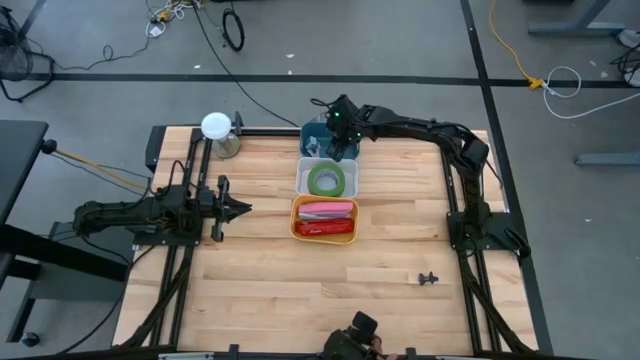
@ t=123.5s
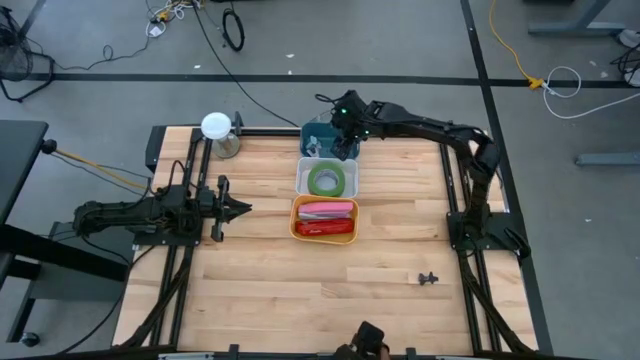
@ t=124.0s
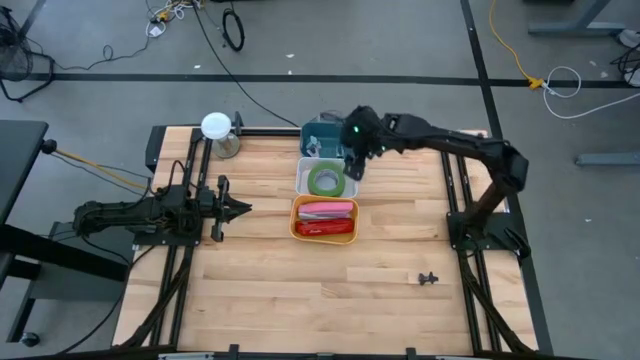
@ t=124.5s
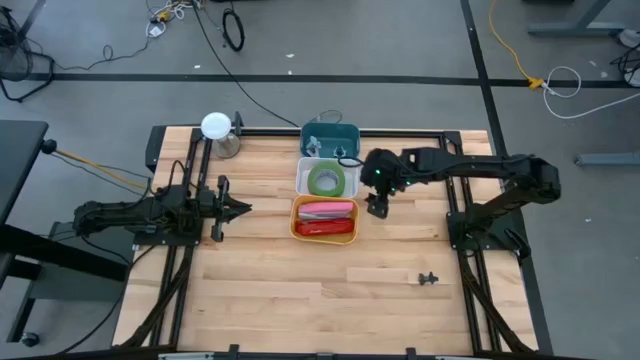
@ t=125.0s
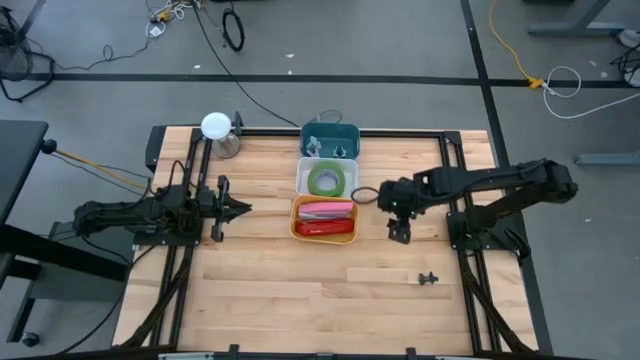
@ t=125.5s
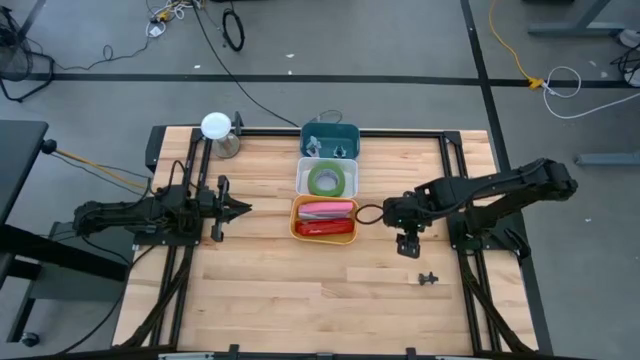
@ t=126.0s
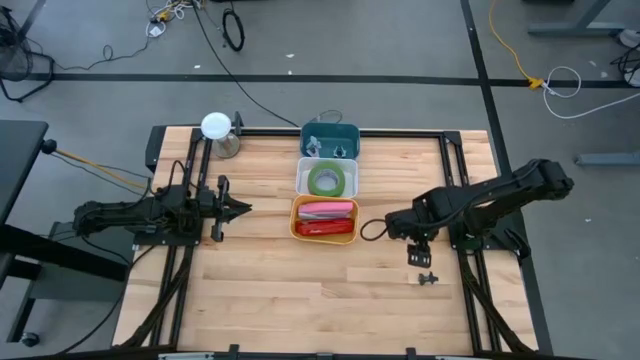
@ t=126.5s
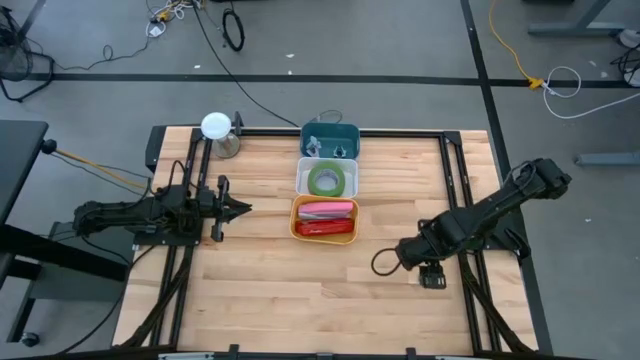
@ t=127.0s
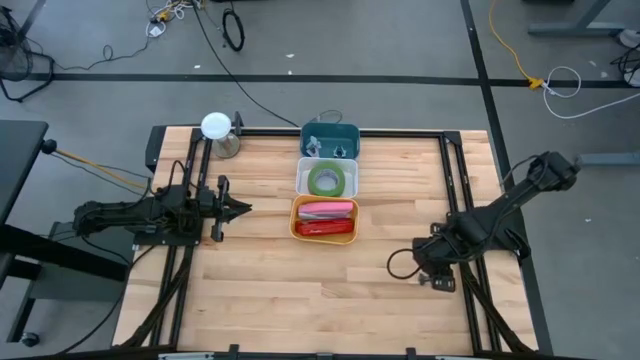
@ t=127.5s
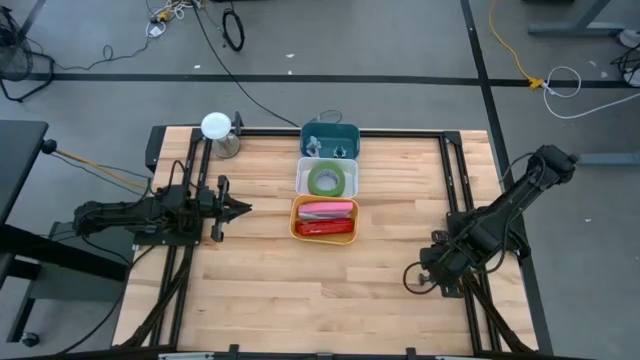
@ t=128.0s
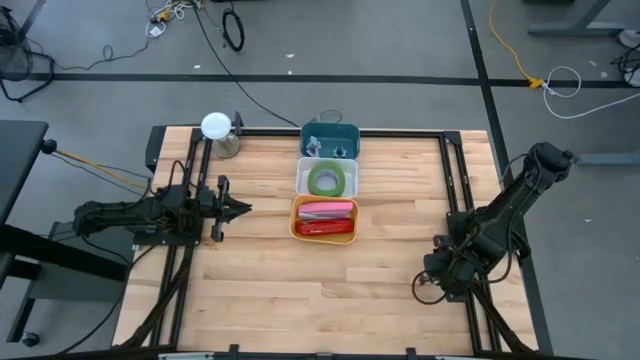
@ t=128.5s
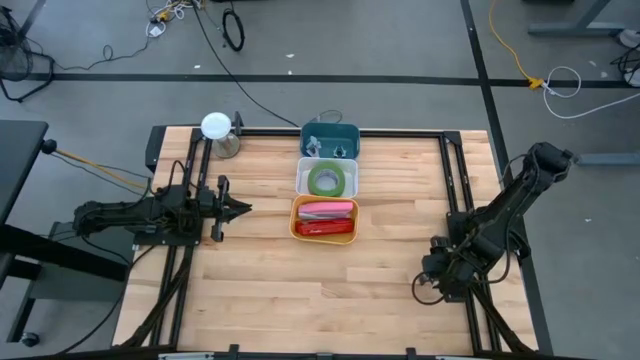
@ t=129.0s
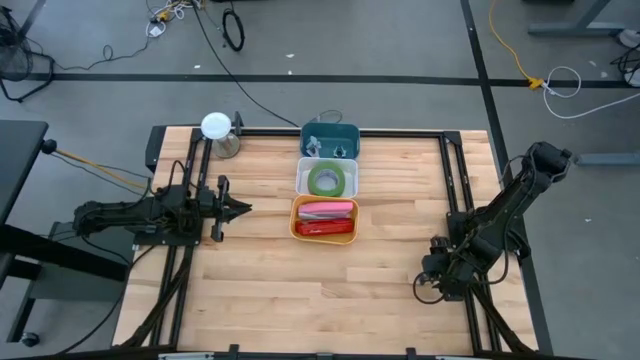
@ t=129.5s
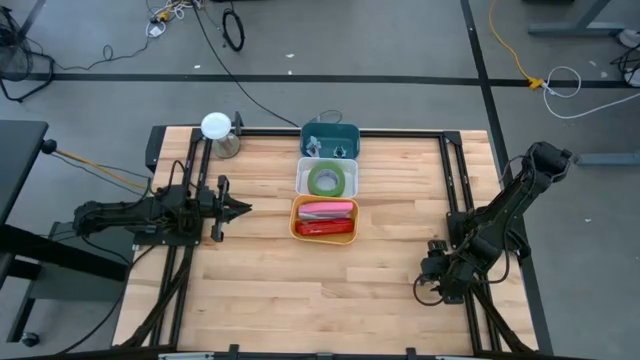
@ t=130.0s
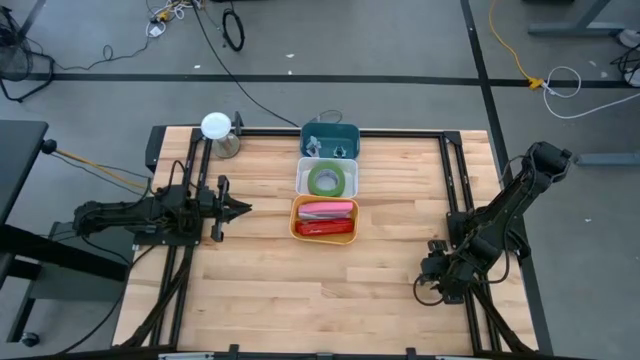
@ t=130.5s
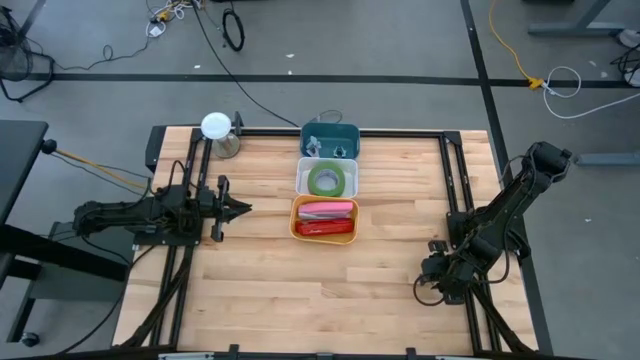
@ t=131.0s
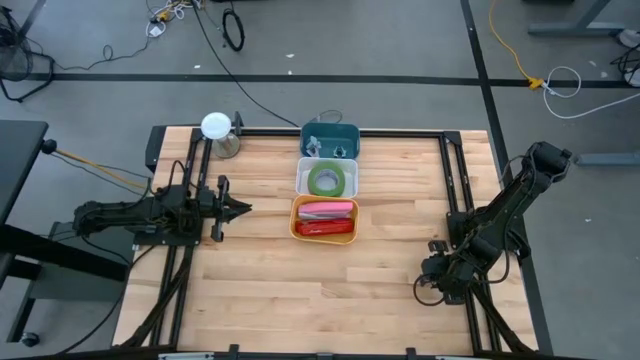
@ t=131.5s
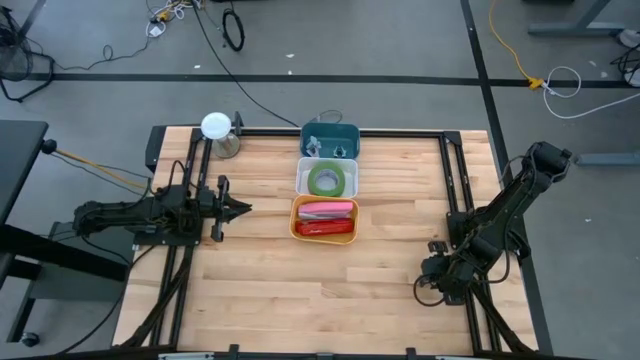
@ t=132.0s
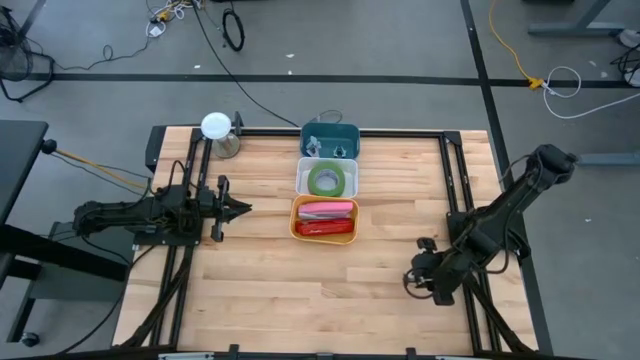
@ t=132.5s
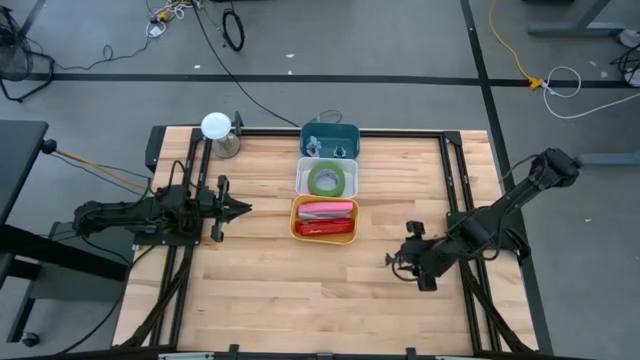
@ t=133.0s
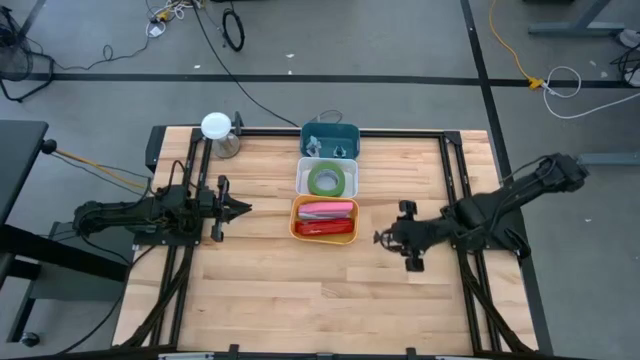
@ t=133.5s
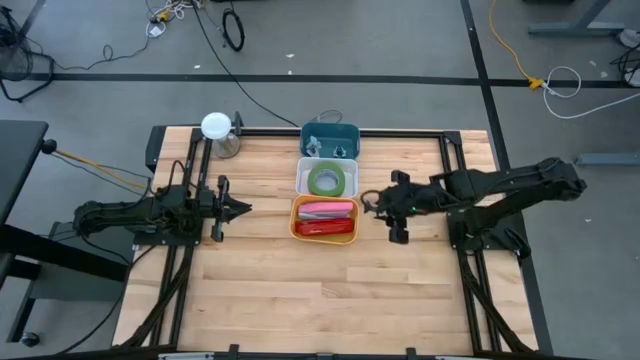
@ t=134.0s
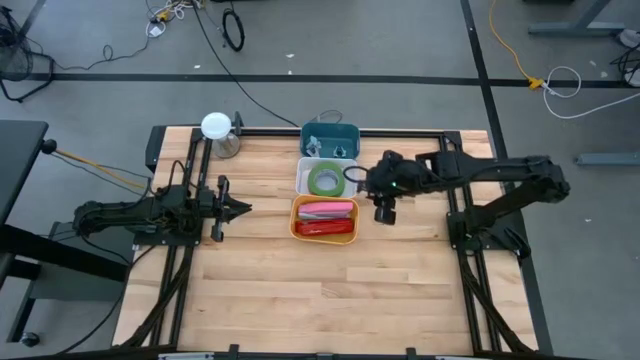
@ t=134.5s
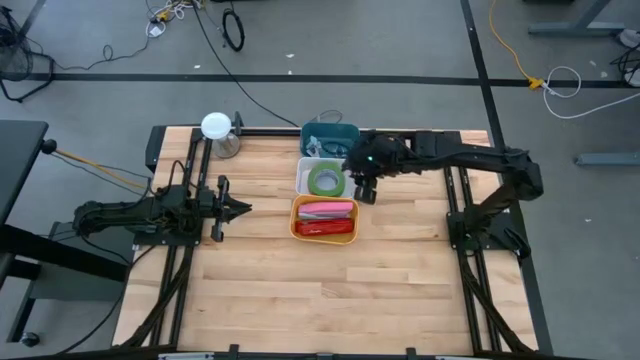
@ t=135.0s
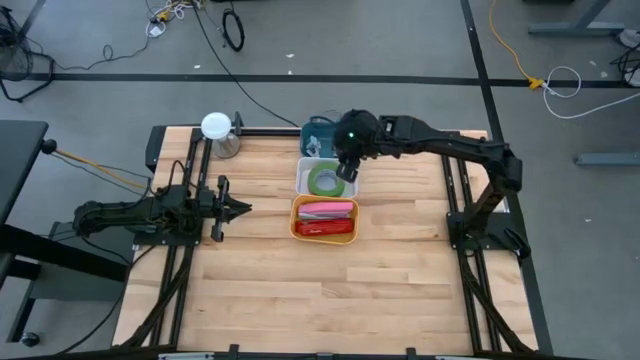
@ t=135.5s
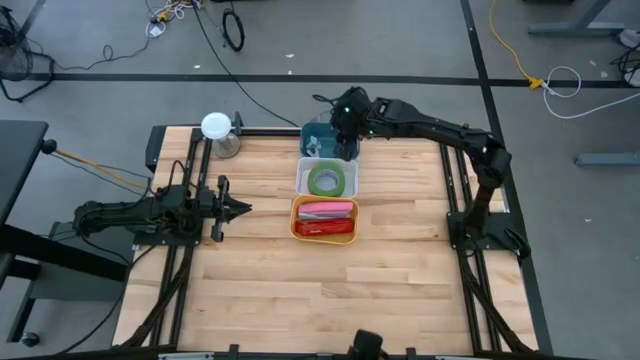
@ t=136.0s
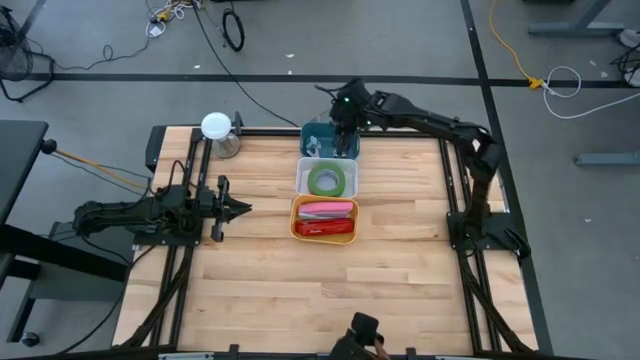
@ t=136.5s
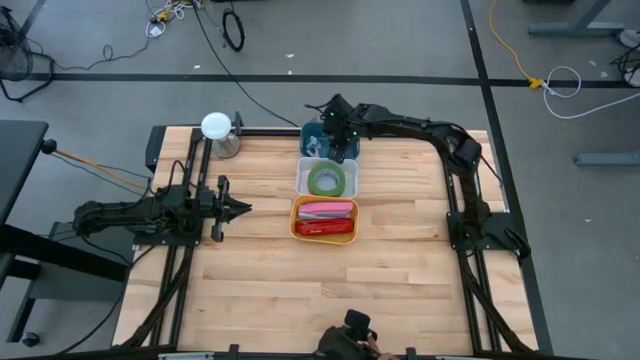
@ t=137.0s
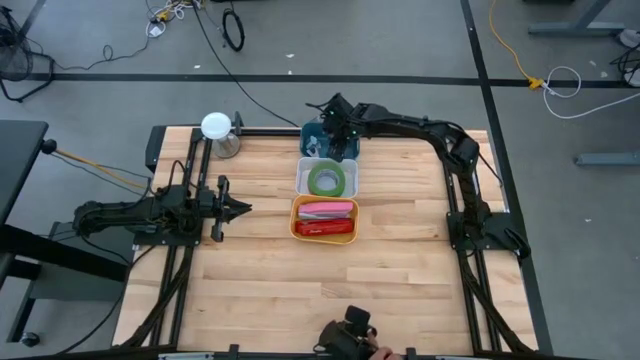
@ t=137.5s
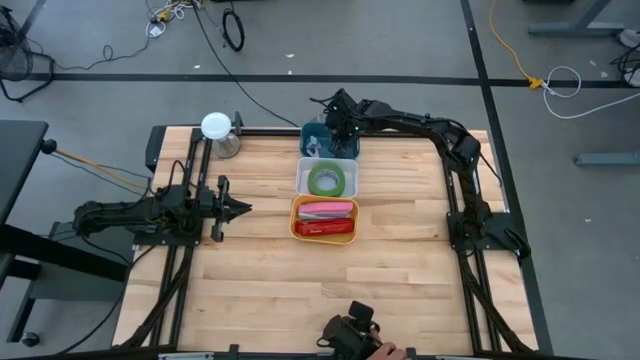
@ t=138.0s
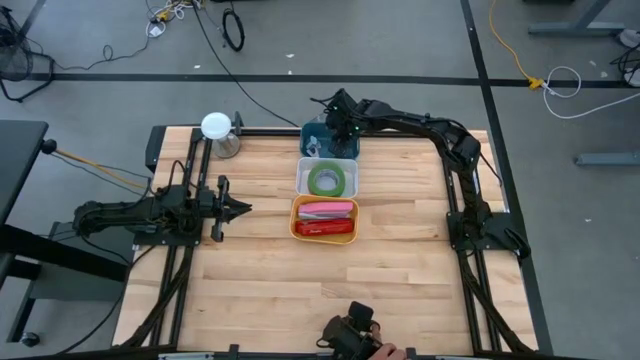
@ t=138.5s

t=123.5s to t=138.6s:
Task: Pick and place Stapler, Stapler remover, tape
Put the black stapler remover into the blue bin

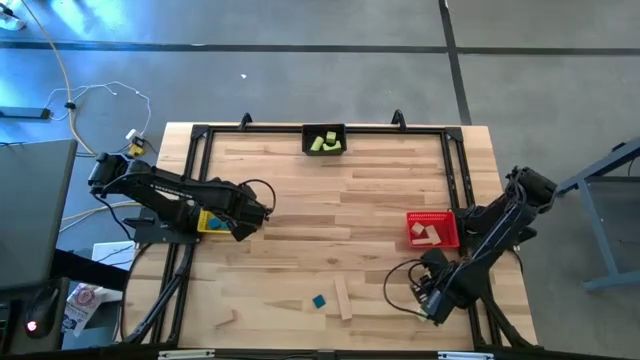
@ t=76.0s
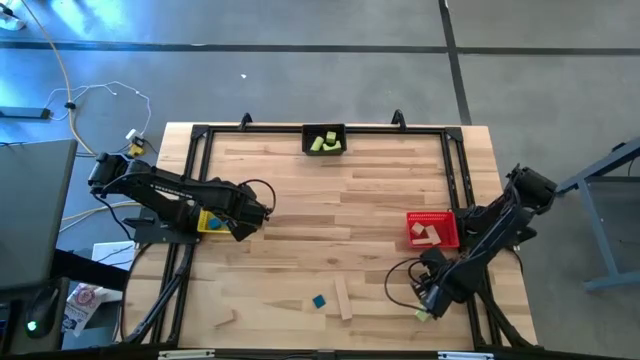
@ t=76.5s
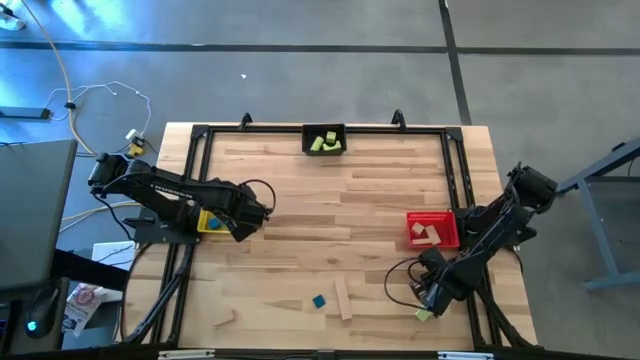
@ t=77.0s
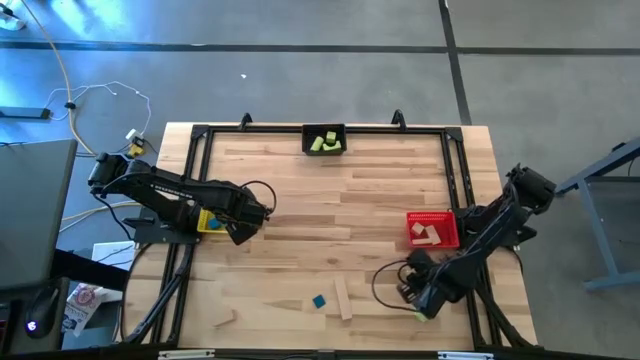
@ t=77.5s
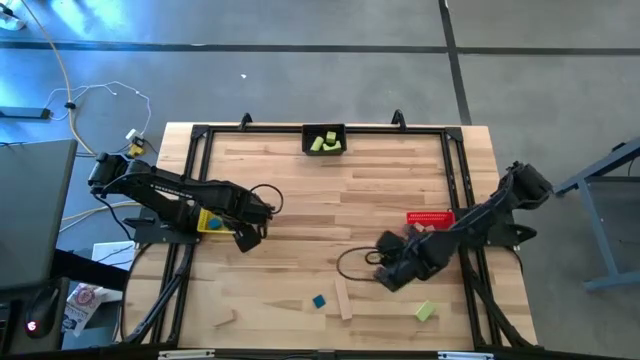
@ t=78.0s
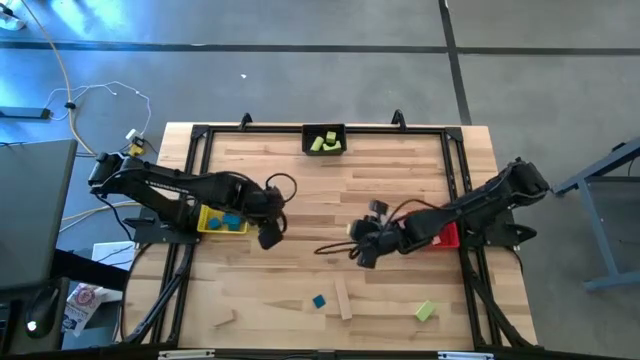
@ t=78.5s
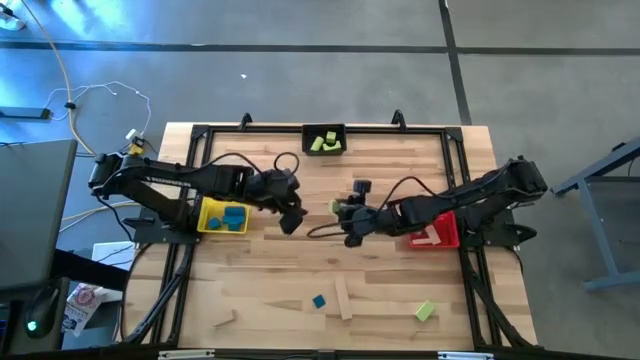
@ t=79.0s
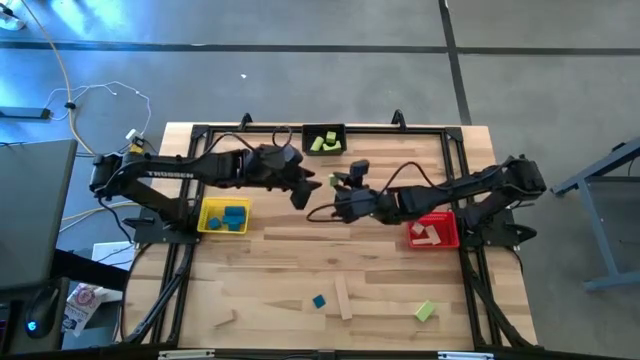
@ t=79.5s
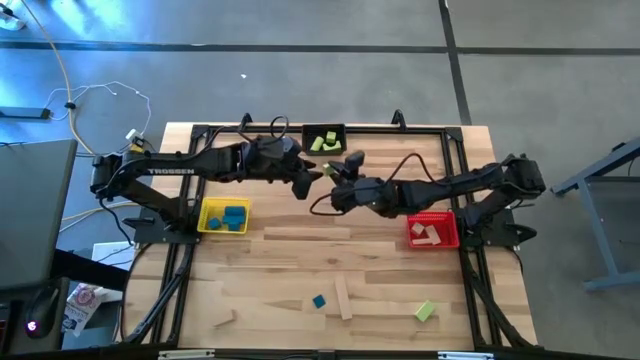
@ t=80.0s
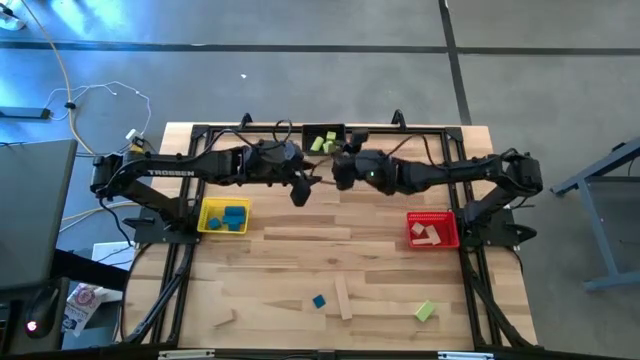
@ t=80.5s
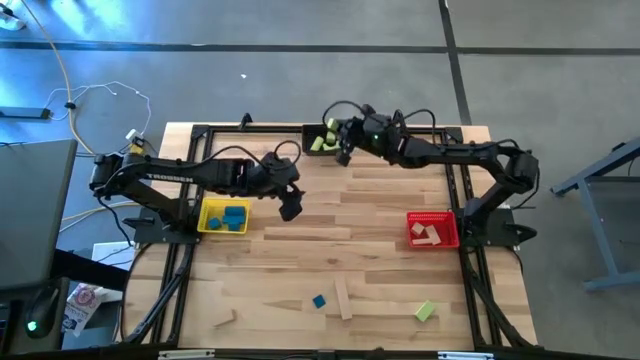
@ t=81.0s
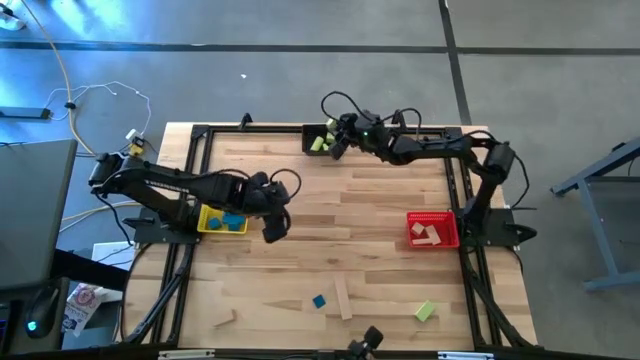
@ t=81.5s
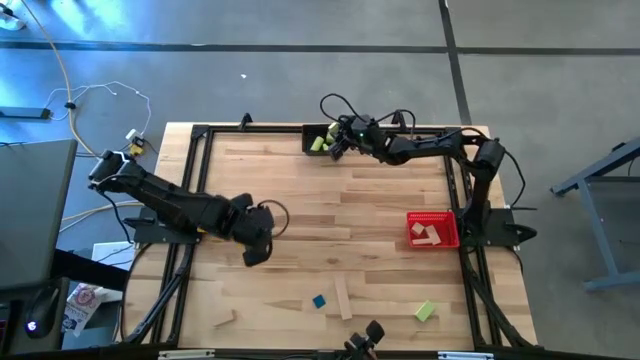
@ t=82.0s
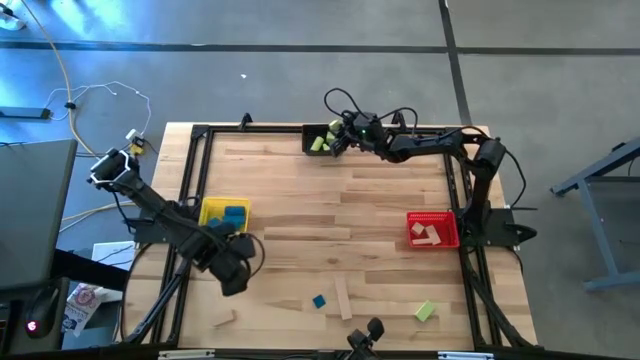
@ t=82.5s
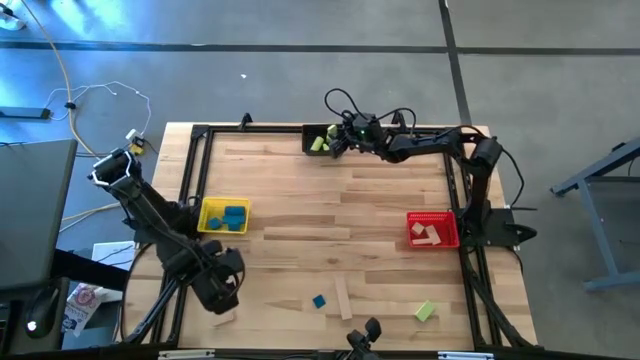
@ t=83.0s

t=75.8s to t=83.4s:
Task: Sort & place blocks by color
Put the light green block into the black bin
